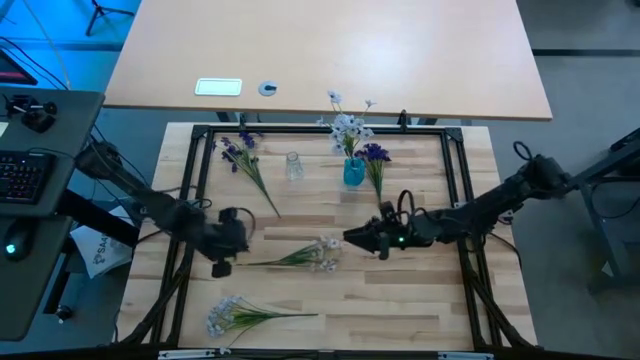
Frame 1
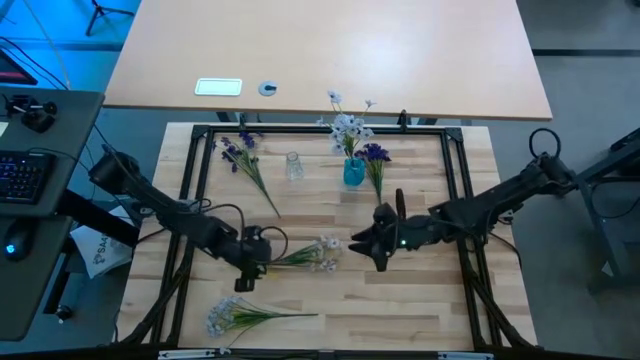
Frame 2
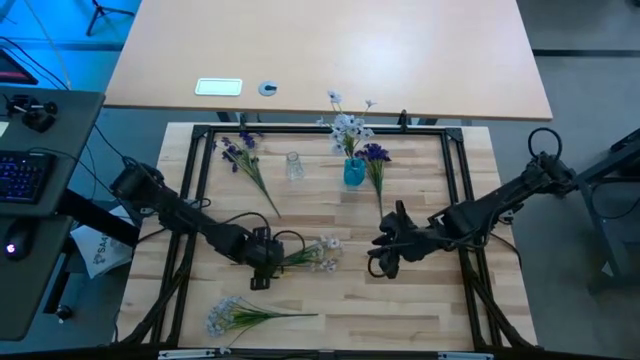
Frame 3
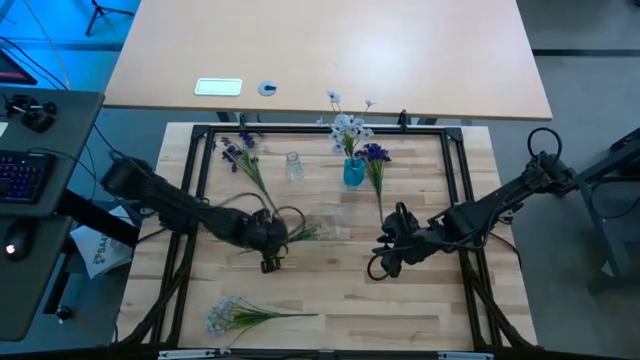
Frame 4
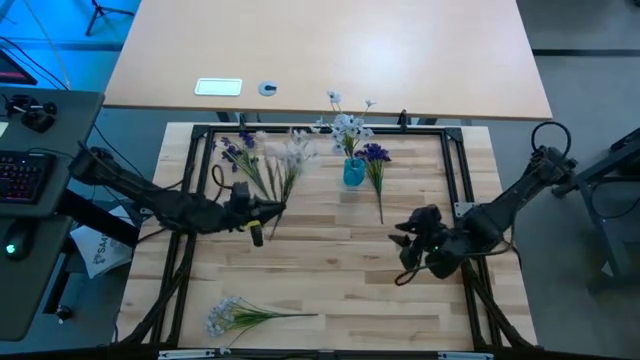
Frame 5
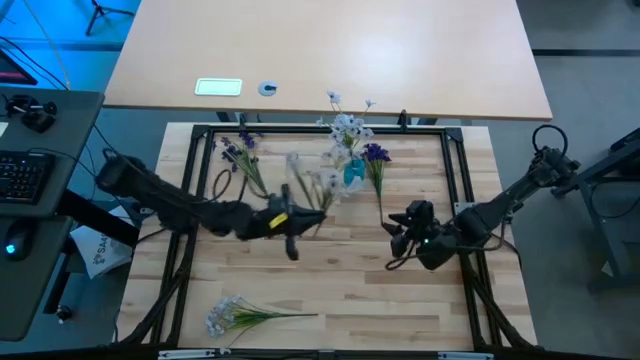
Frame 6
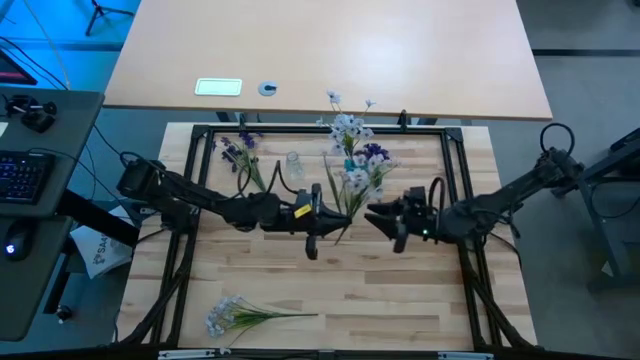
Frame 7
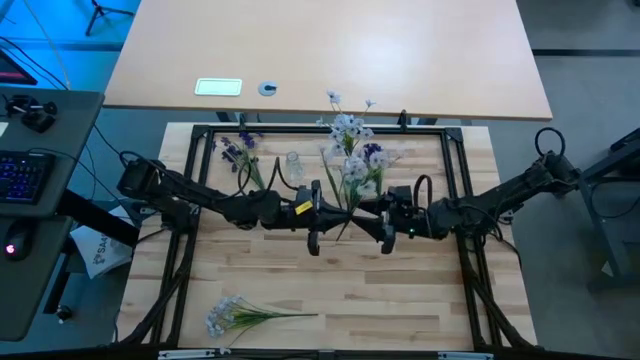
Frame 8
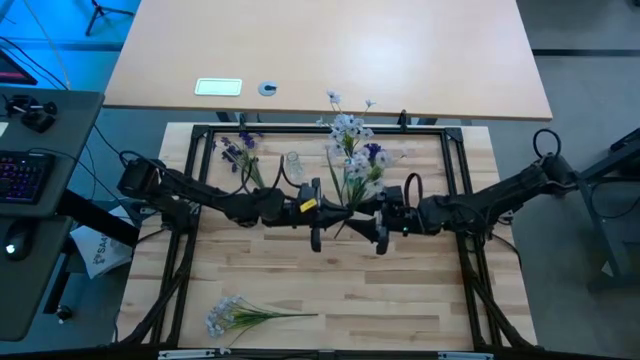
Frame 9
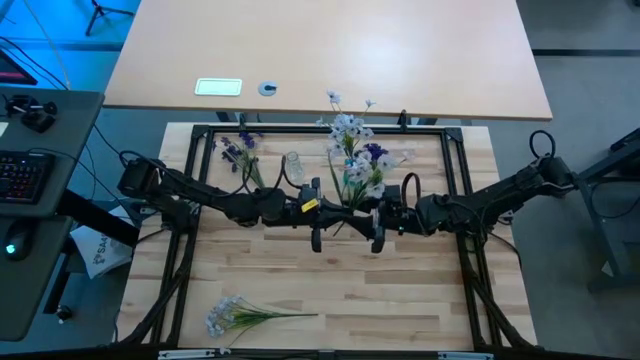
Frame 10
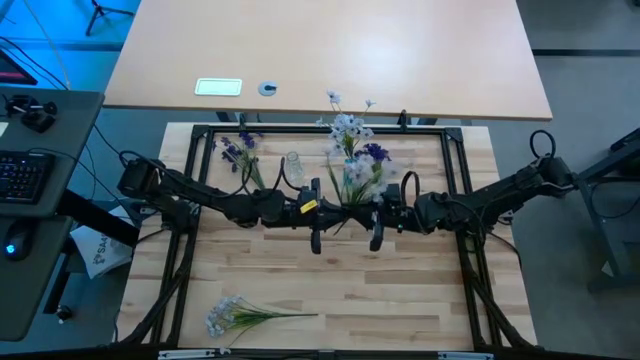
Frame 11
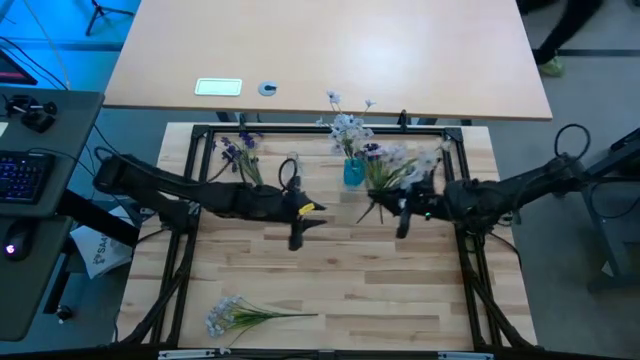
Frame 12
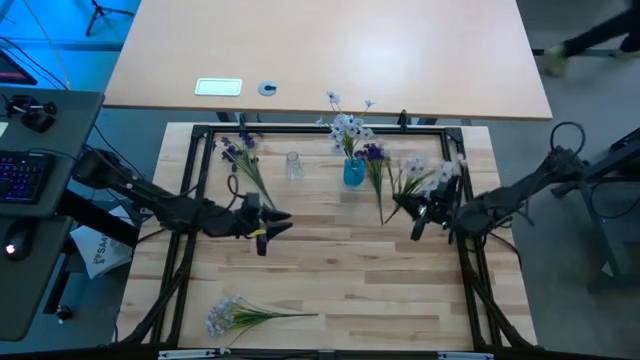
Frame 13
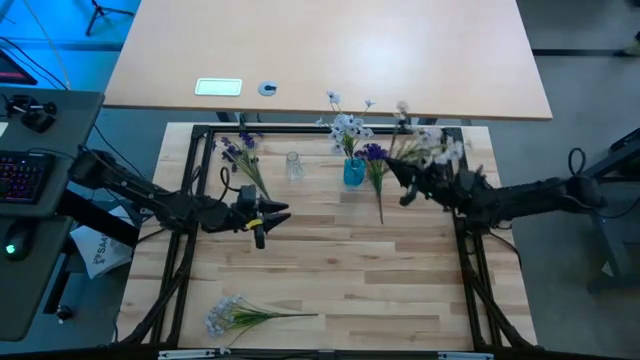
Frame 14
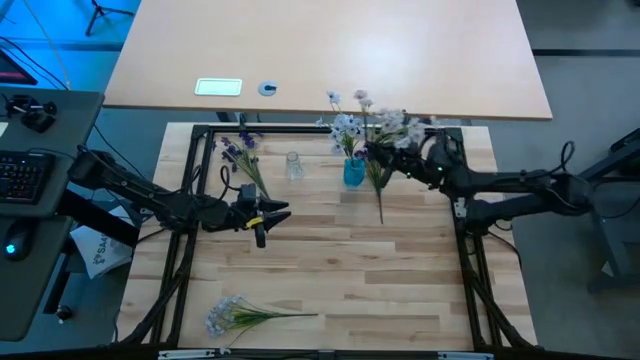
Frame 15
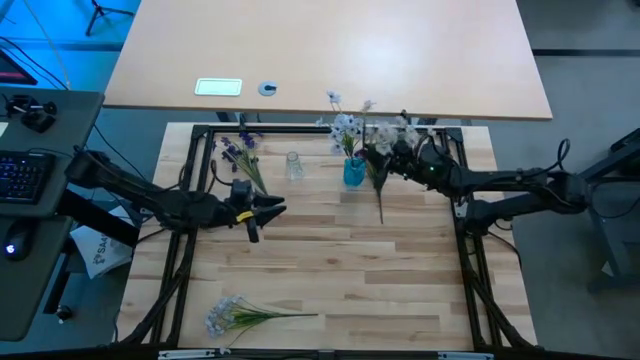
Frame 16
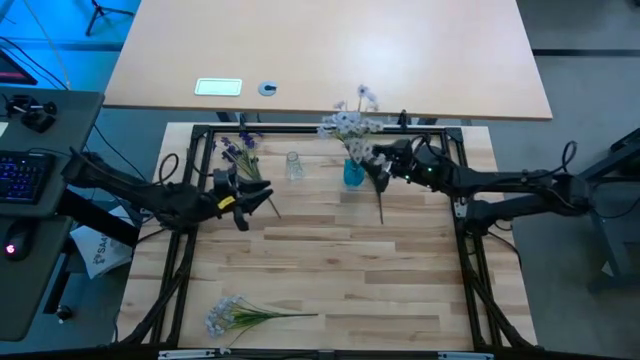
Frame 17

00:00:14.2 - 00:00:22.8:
Task: Sort flowers into vase by color
Put the top white flowers into the blue vase

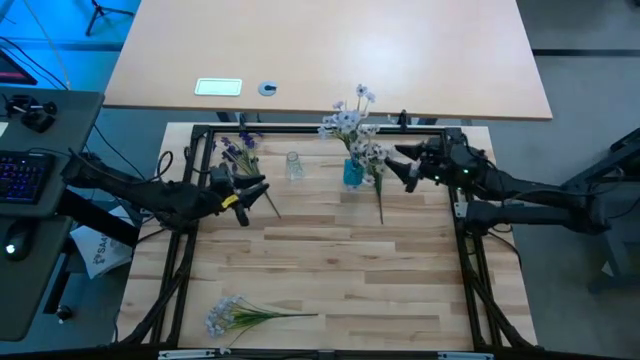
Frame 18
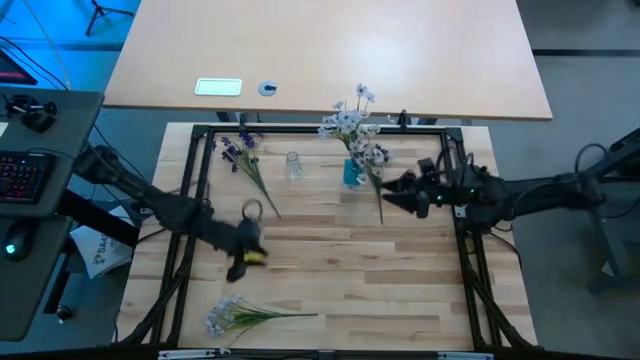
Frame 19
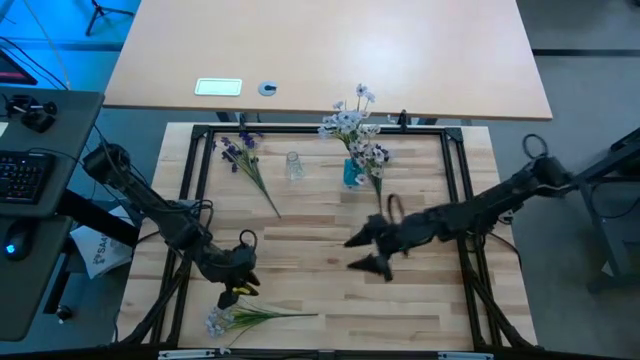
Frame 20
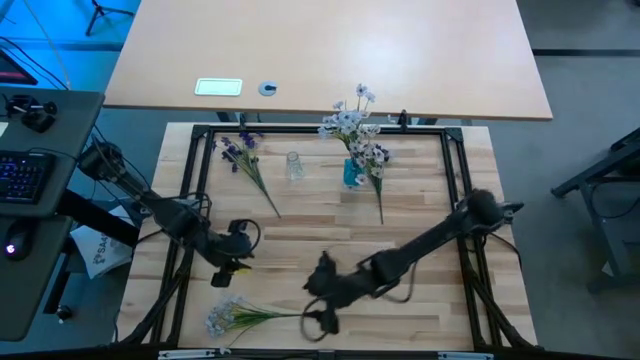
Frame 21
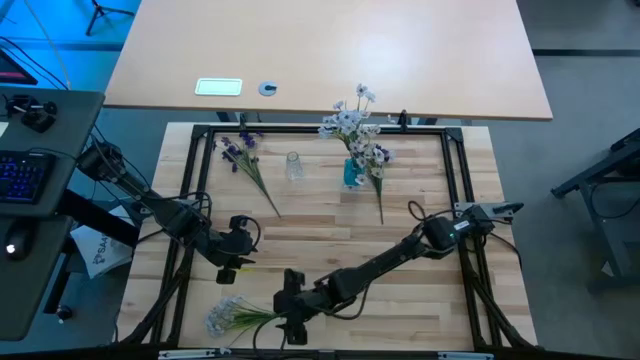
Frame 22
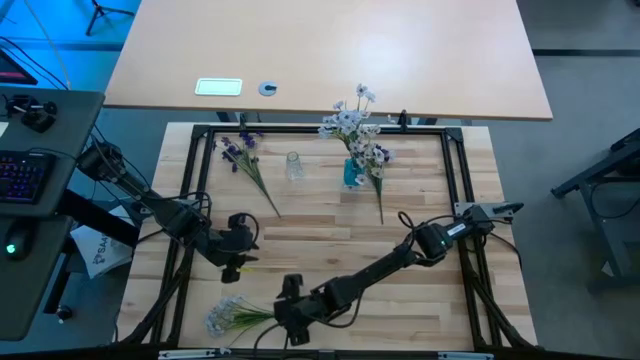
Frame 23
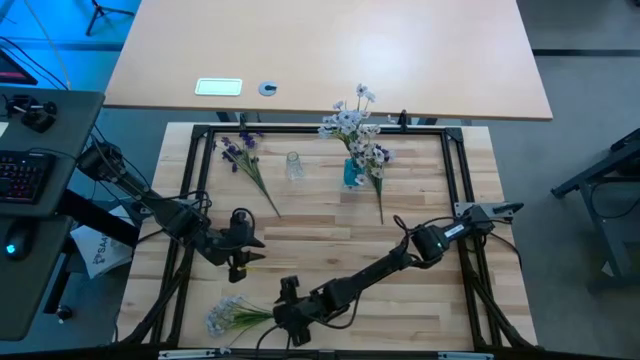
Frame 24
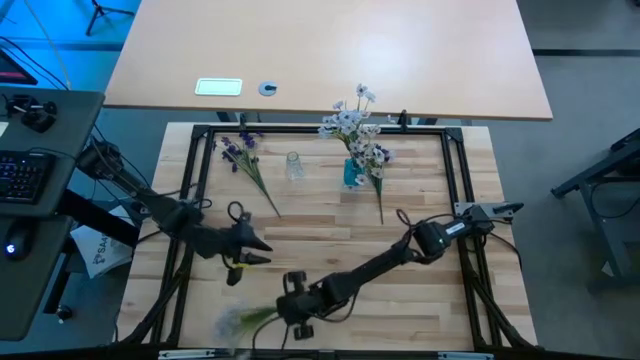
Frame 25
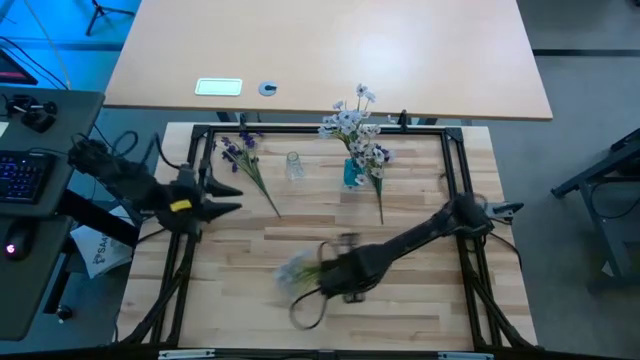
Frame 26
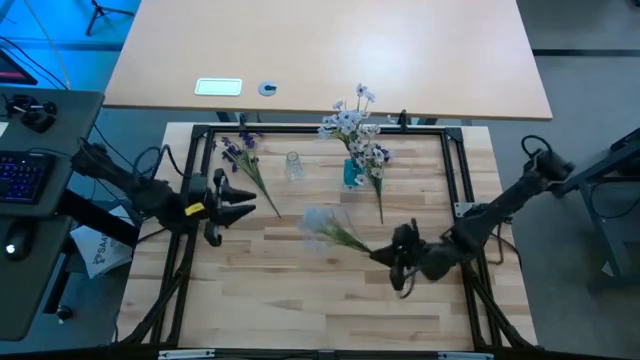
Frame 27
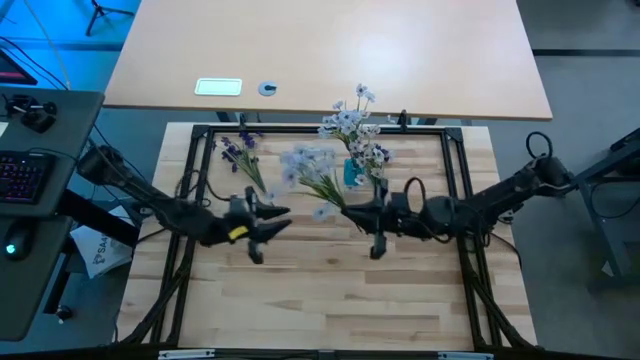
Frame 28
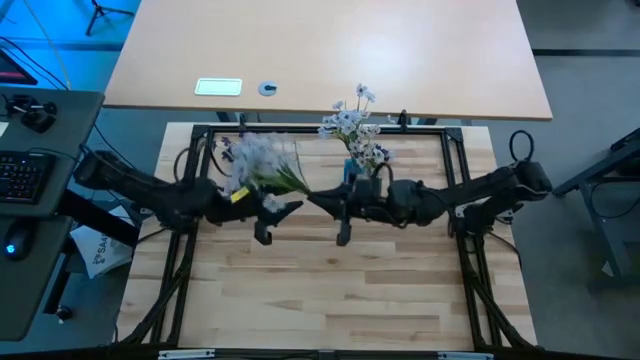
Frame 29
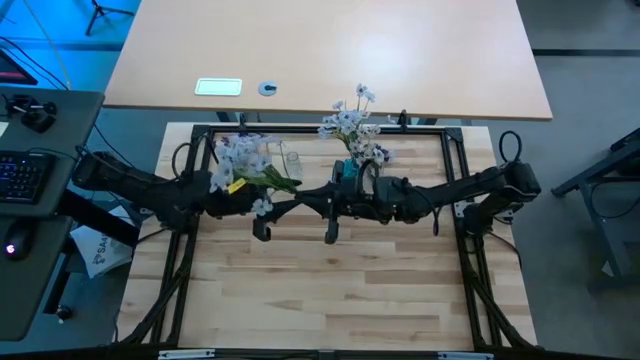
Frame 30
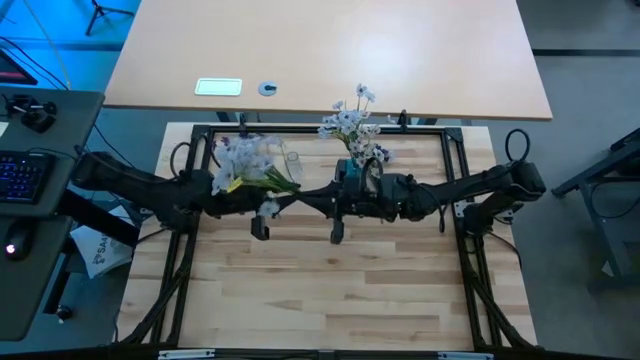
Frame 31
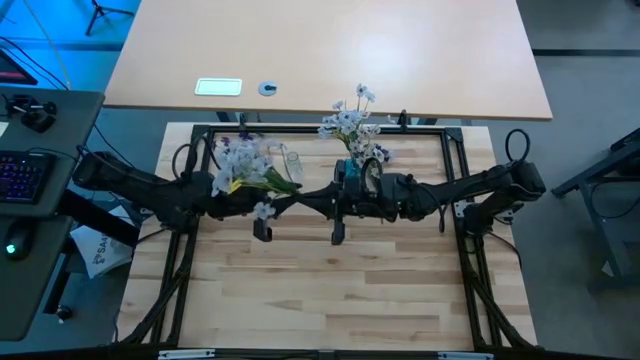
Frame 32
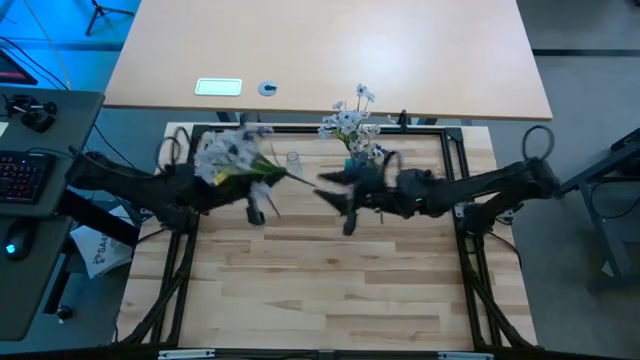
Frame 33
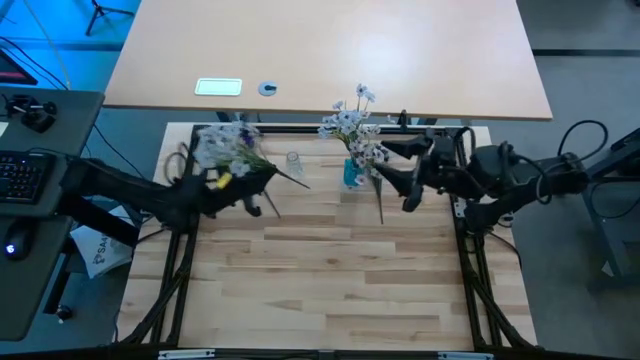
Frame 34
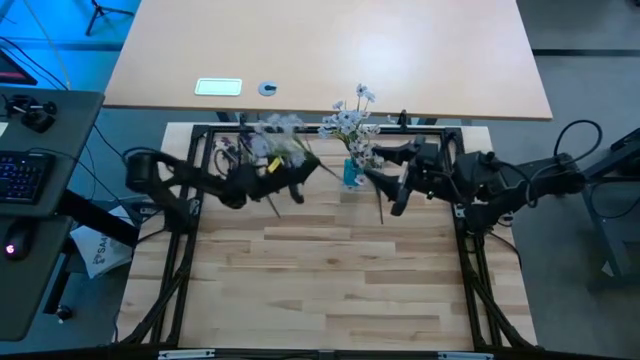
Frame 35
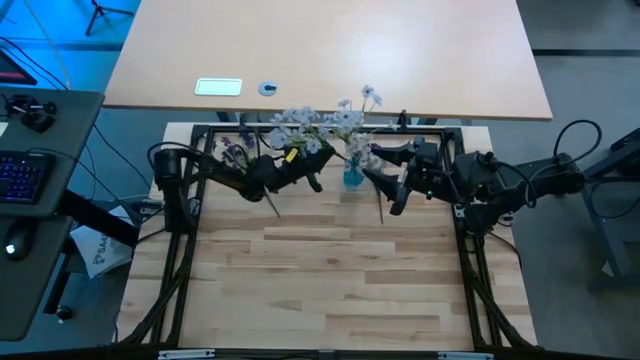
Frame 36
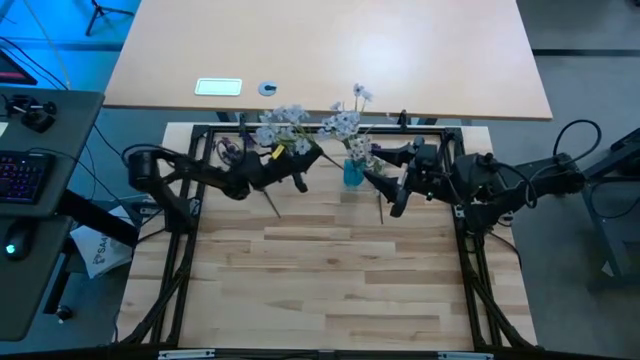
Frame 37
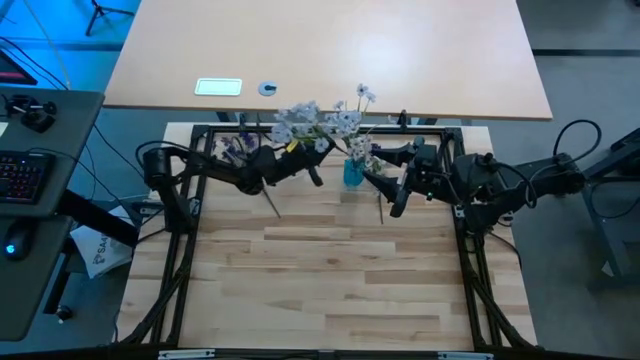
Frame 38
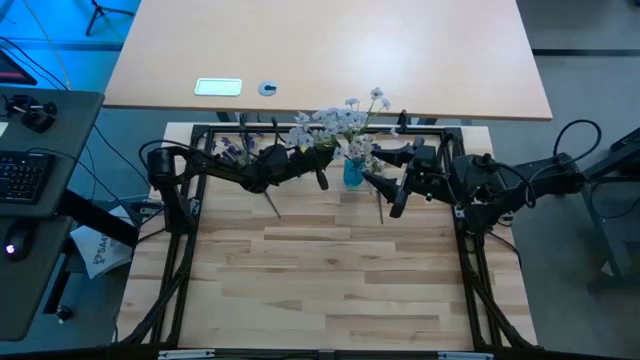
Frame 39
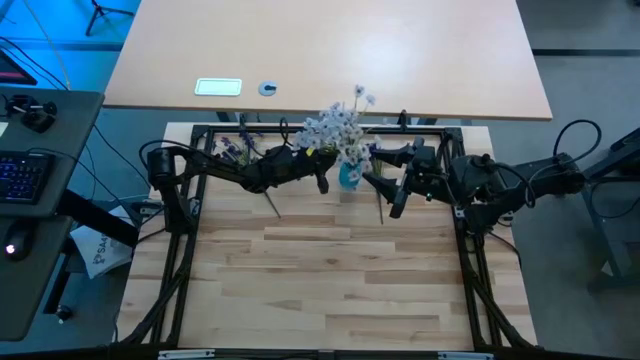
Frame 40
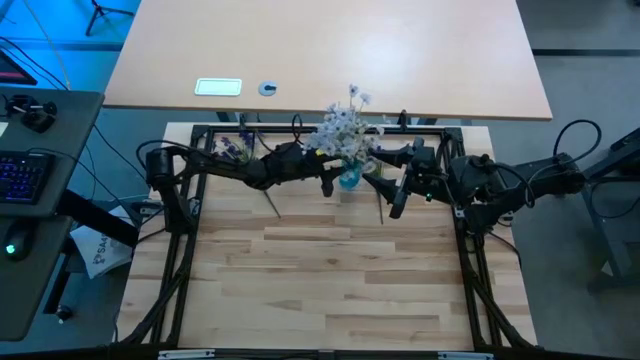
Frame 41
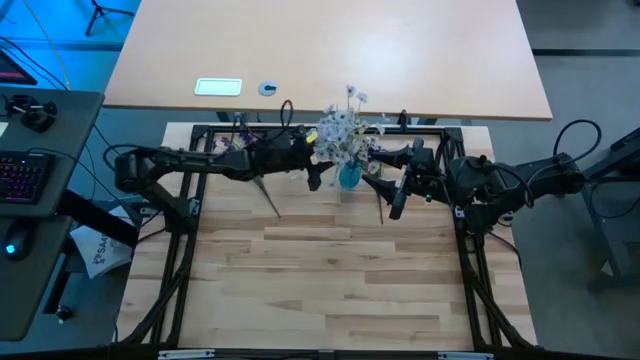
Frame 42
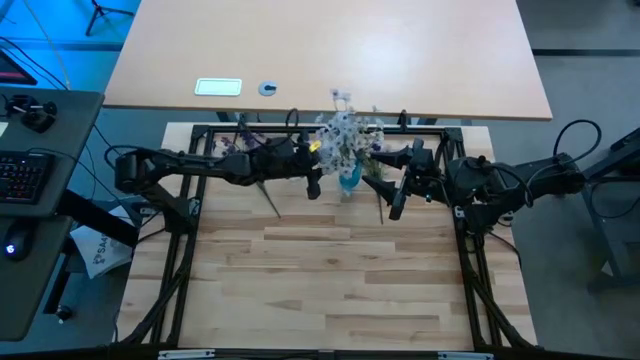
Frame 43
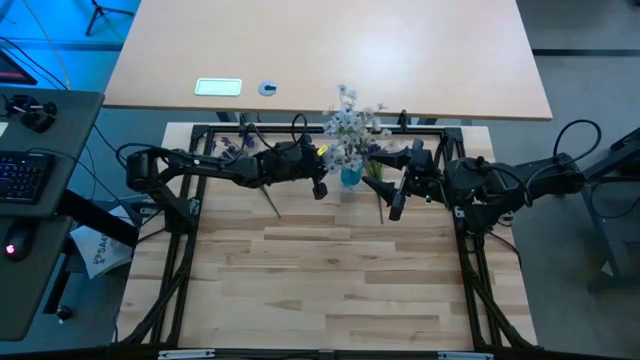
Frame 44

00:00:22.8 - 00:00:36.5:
Put the white flowers into the blue vase
